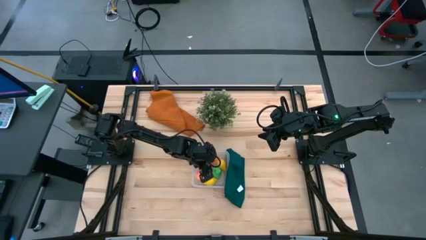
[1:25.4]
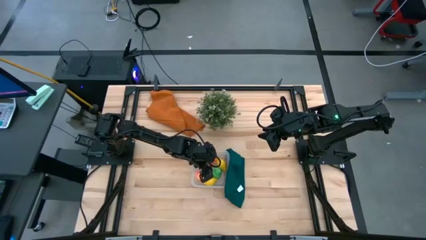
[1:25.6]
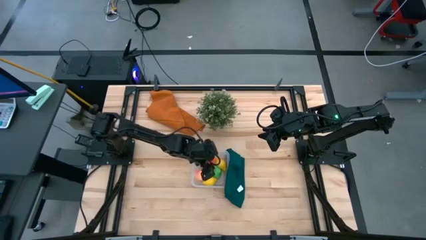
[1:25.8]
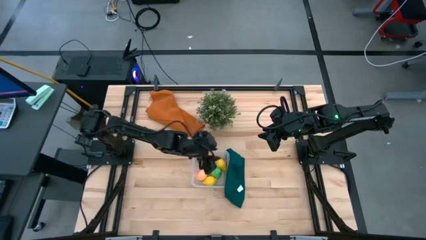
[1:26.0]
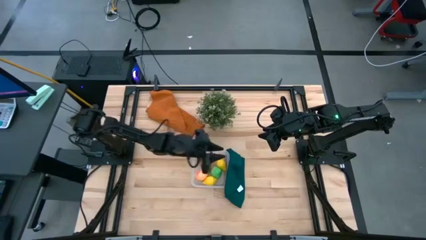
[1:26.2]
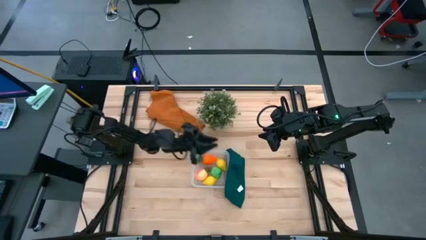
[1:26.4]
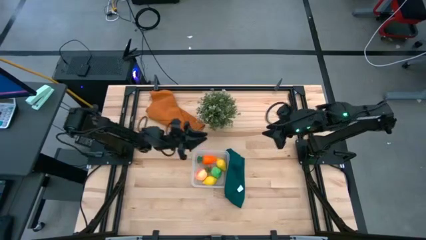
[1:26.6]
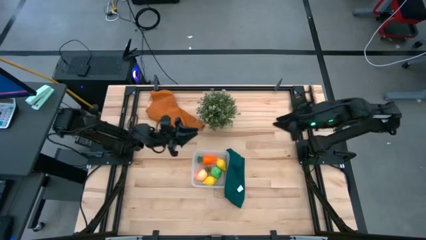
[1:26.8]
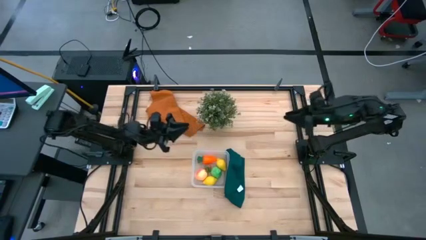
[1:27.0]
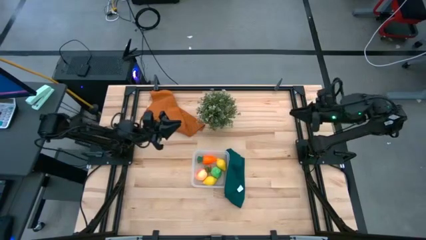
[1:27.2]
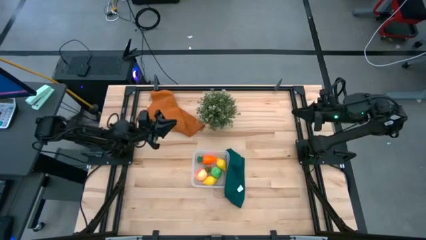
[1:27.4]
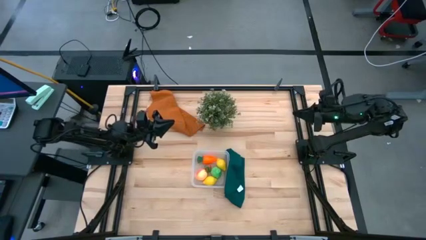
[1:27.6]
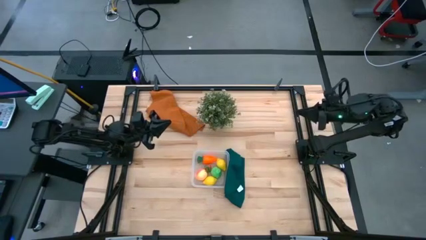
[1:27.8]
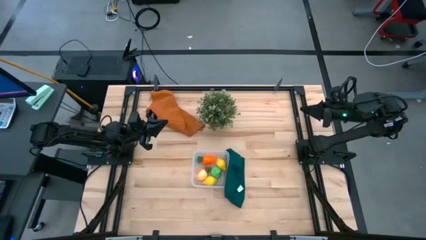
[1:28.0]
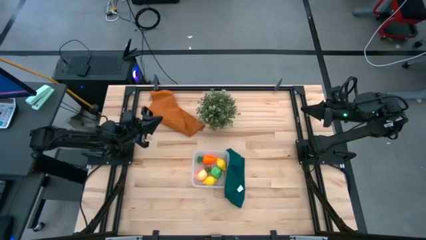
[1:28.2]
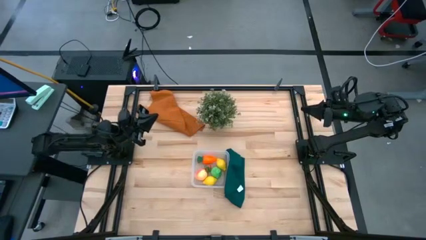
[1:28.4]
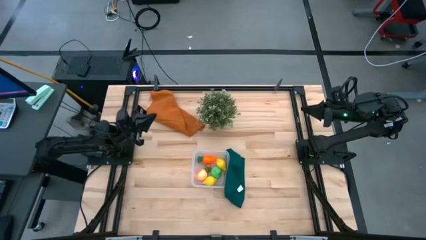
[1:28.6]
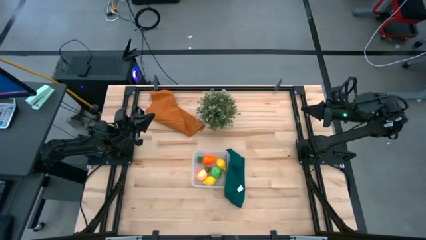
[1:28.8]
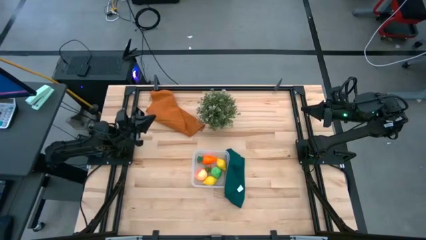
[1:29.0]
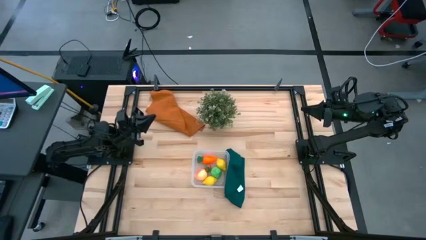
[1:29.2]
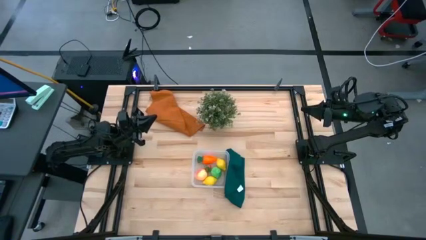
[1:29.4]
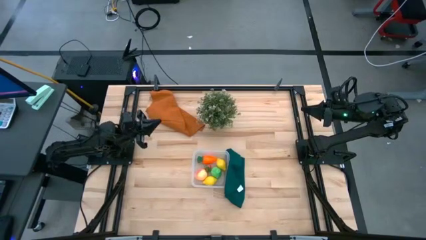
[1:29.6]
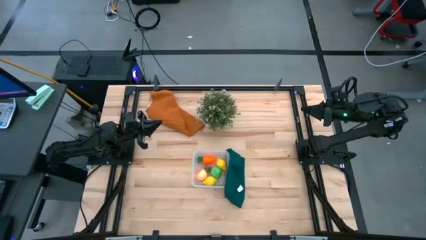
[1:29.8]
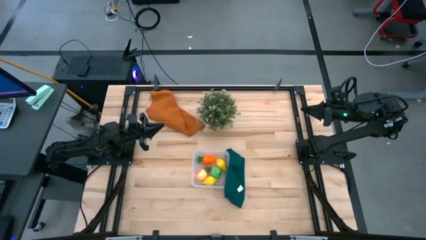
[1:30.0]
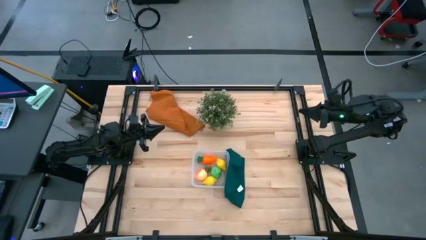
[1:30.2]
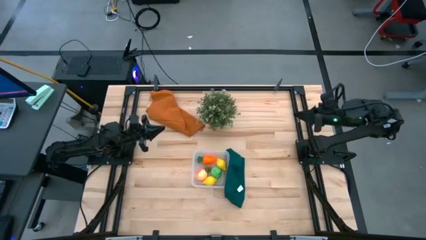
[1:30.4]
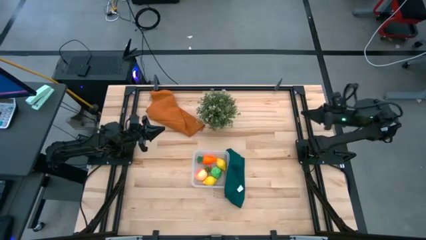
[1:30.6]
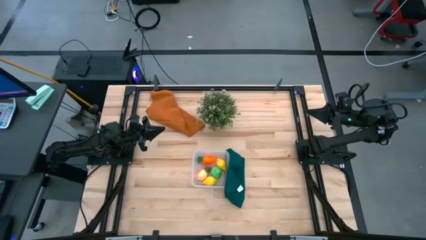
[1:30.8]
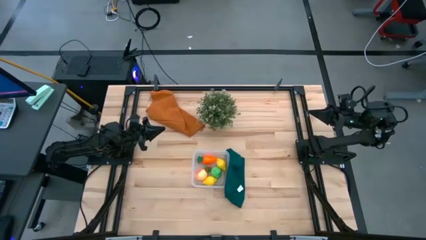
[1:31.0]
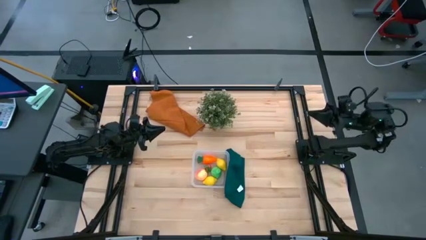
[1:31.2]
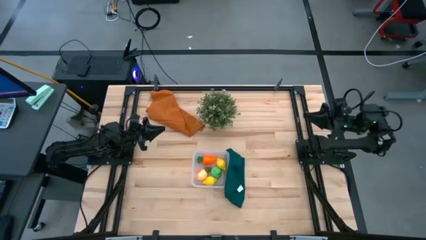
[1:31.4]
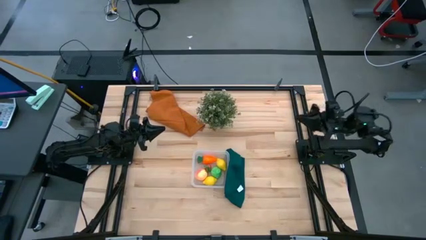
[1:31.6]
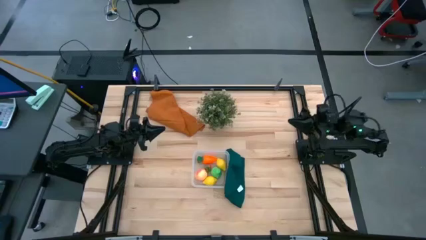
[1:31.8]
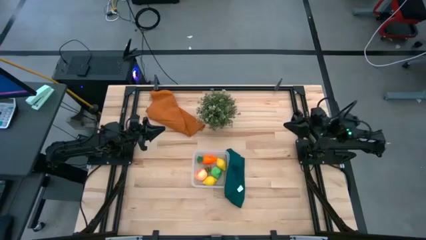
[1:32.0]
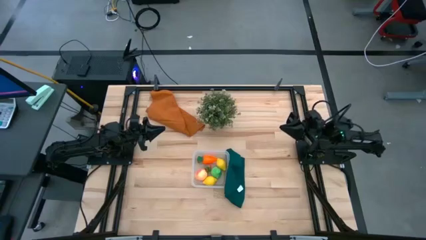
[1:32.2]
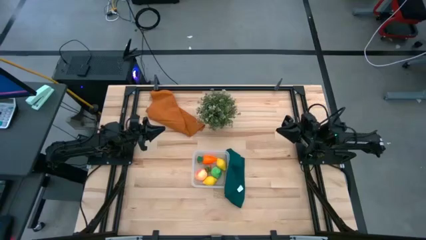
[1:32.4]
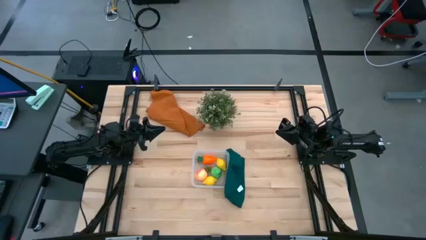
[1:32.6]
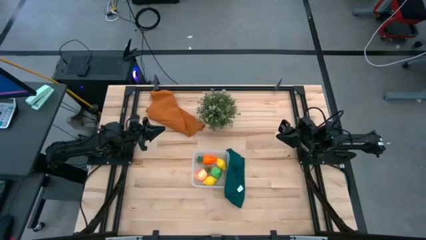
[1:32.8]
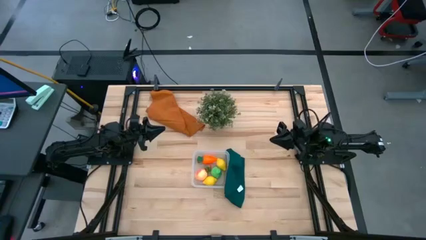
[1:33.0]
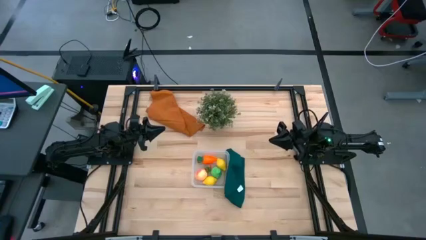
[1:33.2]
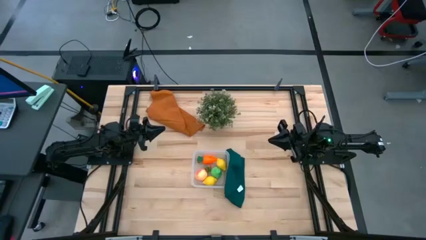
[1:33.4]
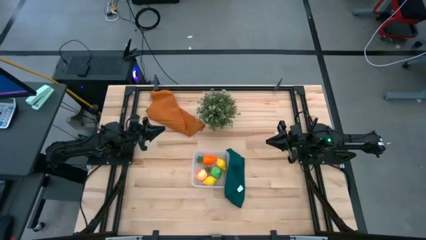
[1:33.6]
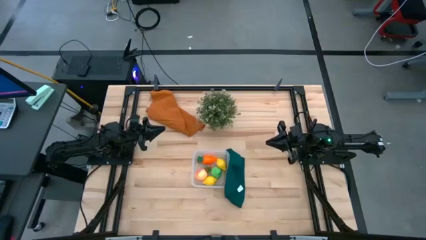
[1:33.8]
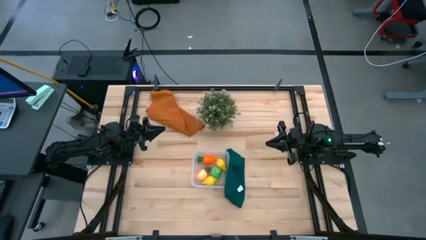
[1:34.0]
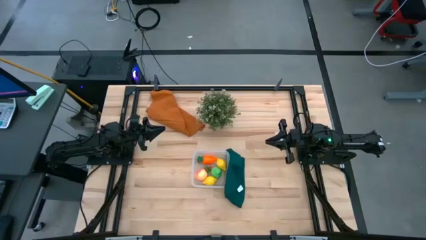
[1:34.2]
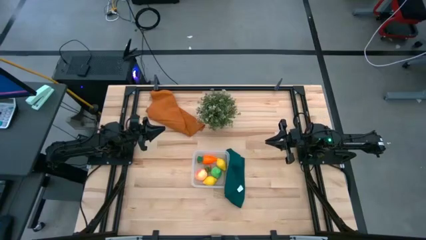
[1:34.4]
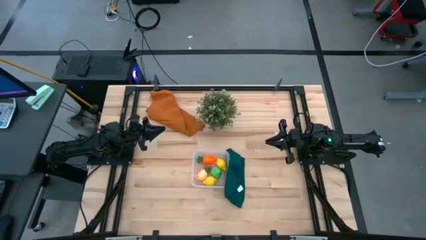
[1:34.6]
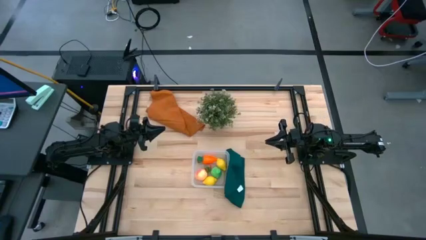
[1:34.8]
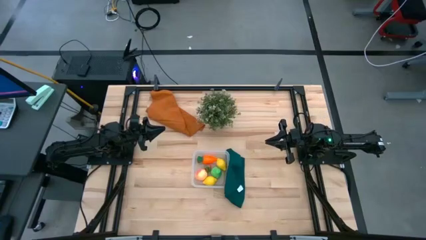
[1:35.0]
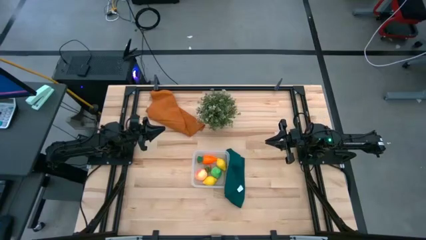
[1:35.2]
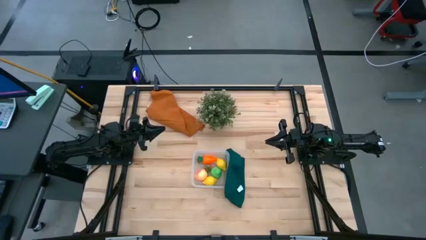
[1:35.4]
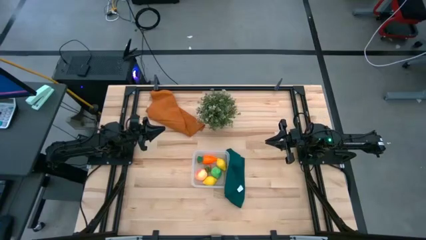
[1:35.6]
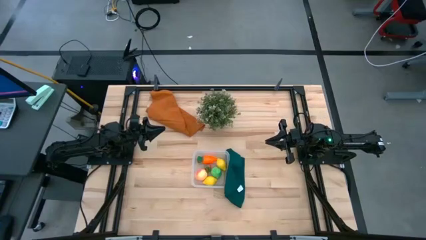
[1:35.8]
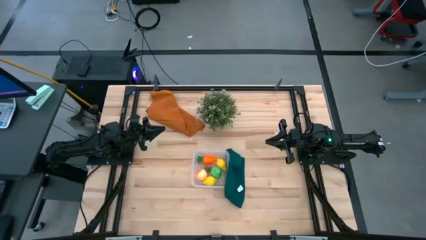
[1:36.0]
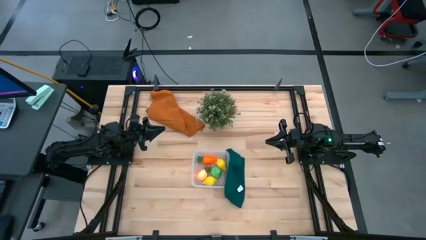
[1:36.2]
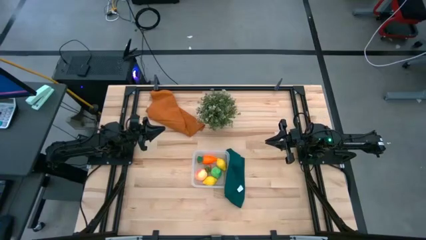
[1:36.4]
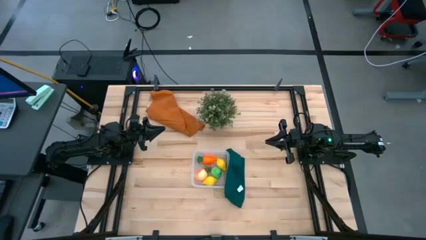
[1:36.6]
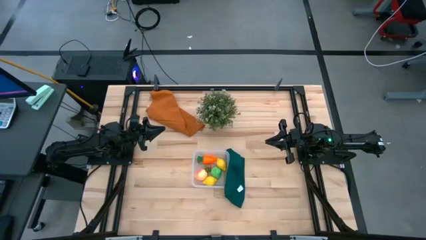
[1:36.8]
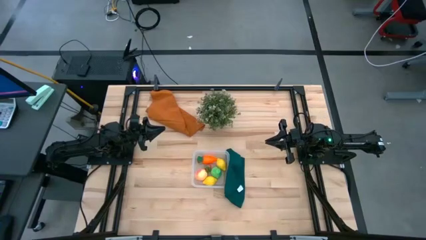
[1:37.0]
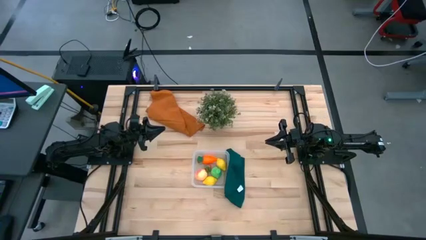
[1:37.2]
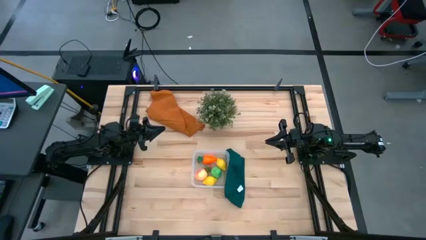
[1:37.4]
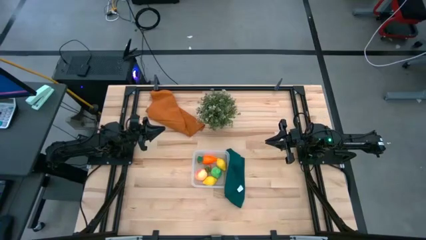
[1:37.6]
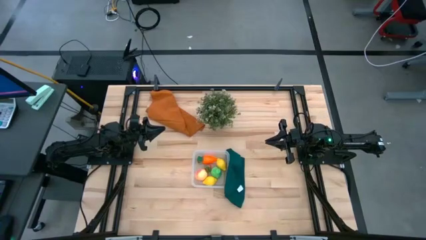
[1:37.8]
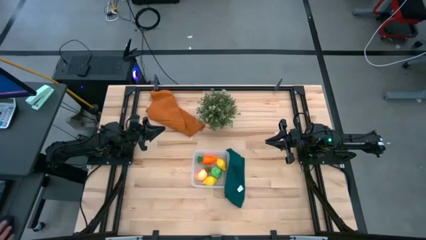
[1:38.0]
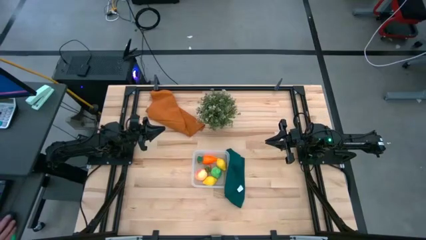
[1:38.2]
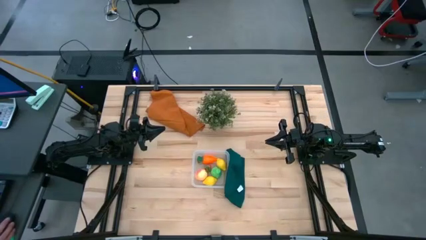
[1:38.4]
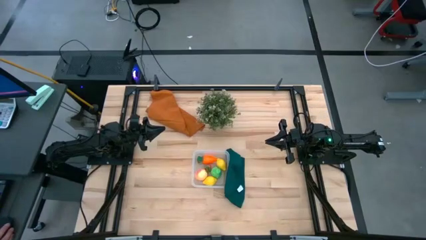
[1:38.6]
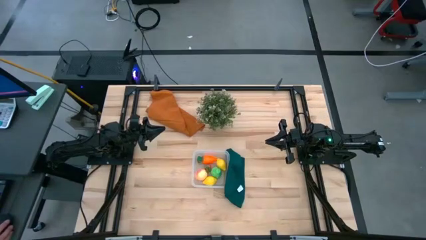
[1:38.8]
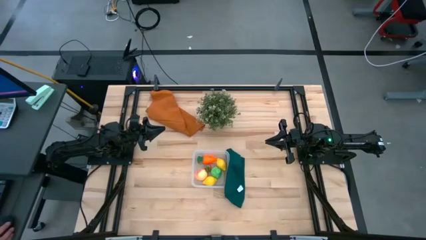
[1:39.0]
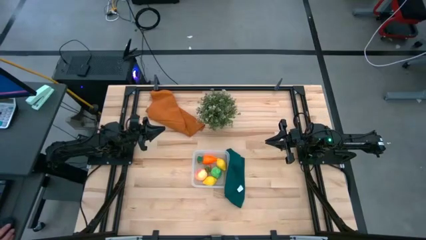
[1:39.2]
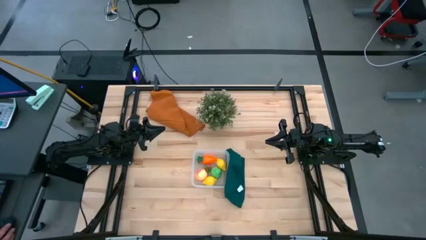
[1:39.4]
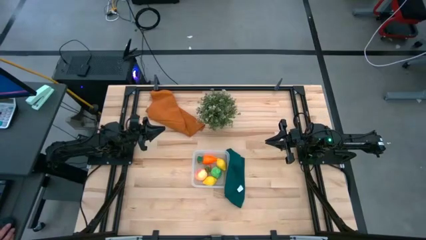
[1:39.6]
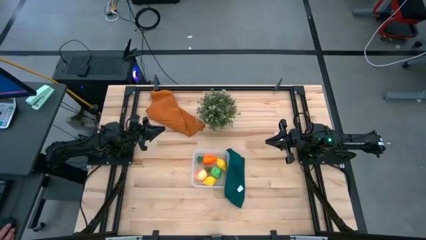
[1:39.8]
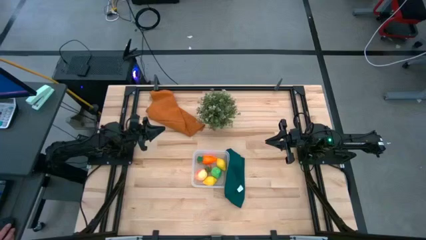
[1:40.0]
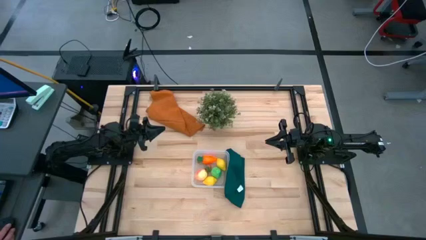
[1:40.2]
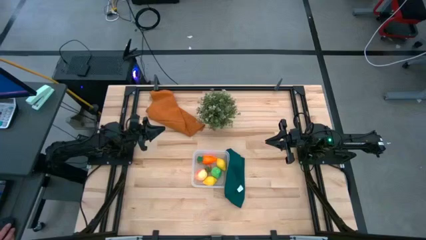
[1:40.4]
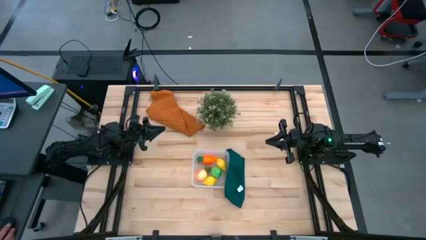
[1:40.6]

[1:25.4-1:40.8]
Task: Pick and placing Produce into tupperware
Return to Home Position
